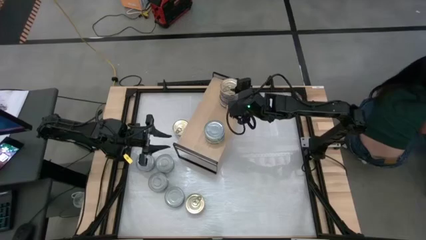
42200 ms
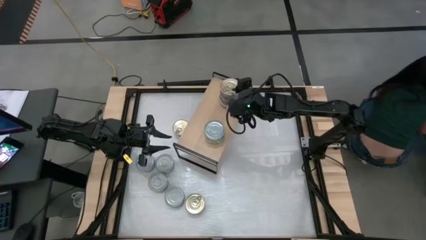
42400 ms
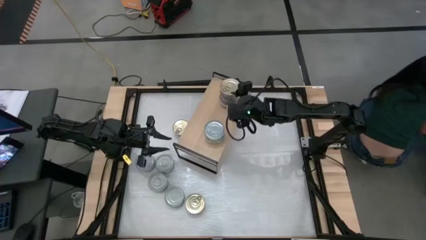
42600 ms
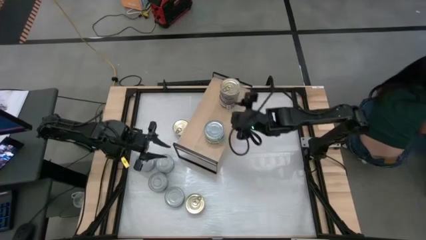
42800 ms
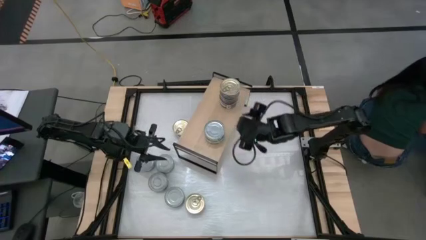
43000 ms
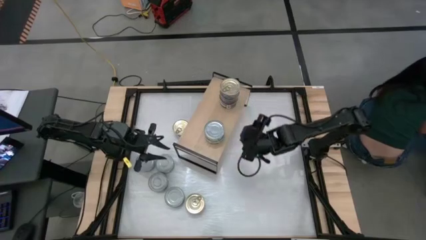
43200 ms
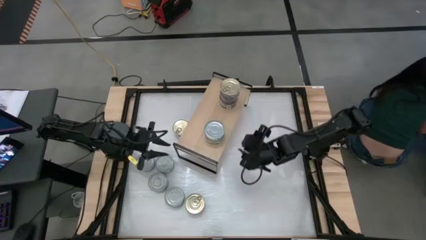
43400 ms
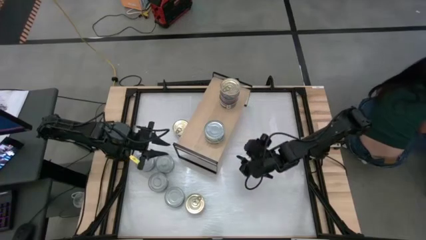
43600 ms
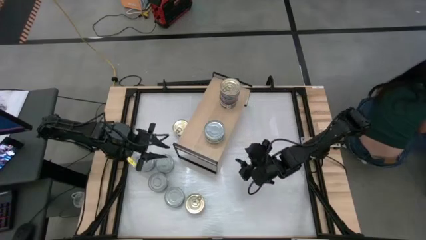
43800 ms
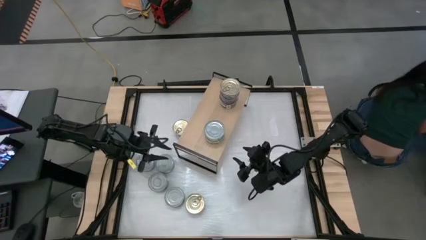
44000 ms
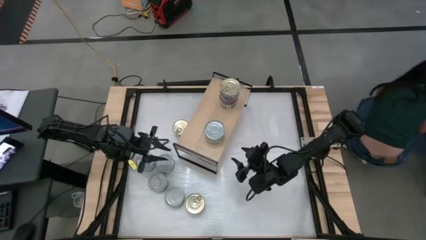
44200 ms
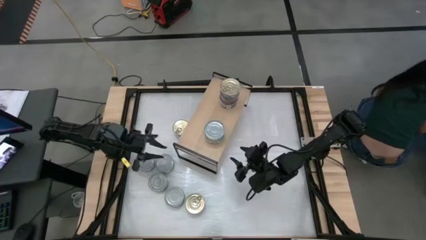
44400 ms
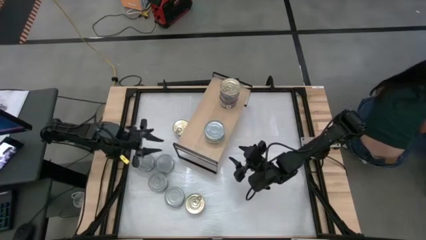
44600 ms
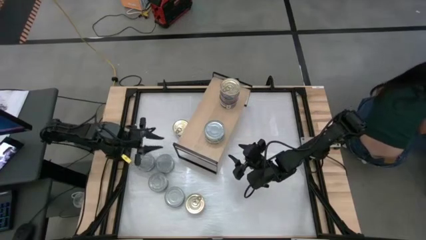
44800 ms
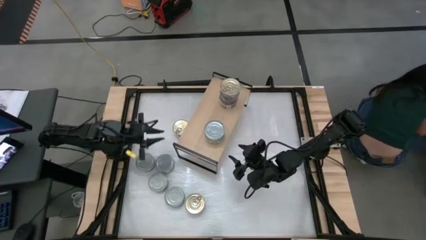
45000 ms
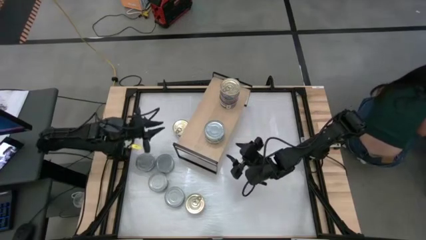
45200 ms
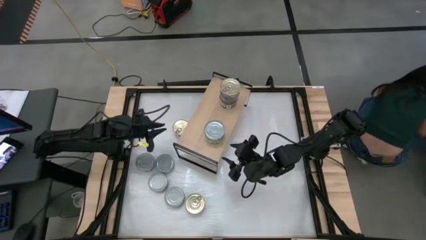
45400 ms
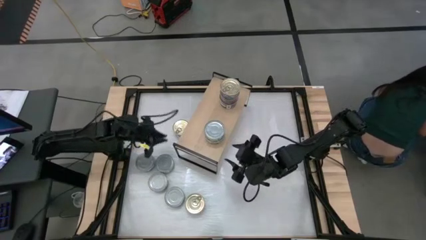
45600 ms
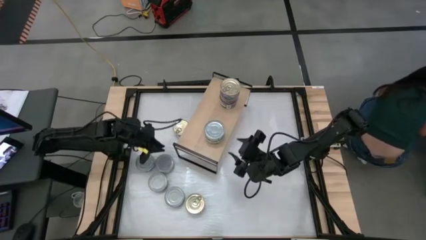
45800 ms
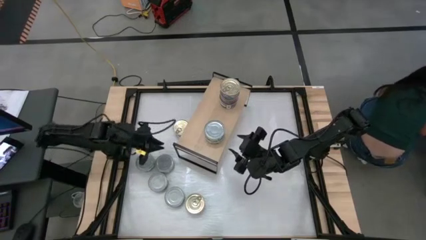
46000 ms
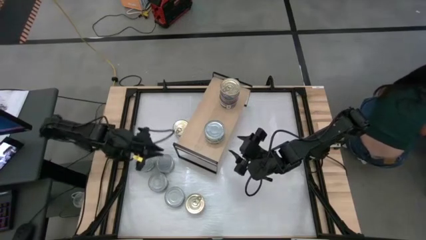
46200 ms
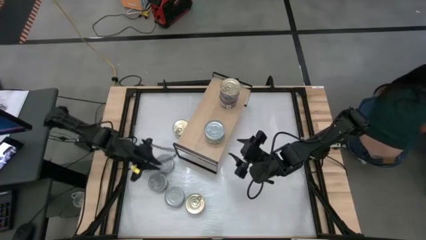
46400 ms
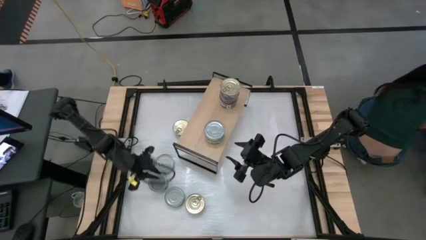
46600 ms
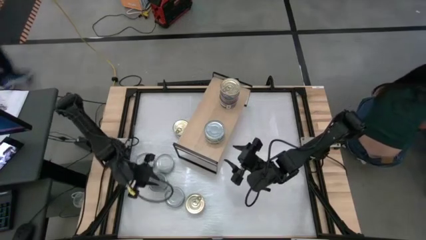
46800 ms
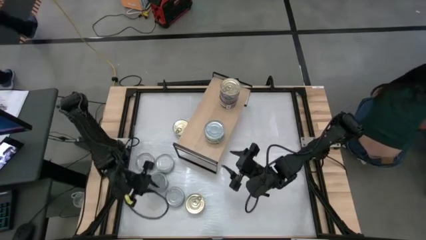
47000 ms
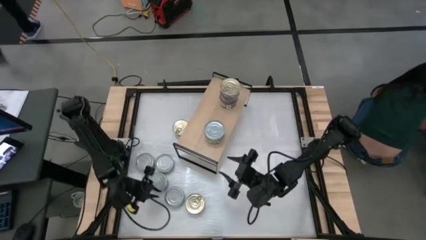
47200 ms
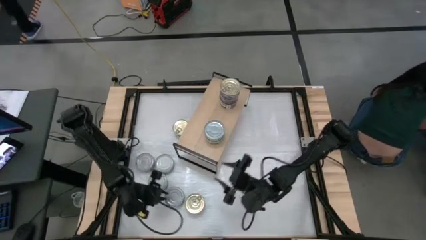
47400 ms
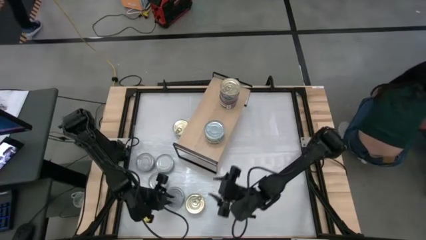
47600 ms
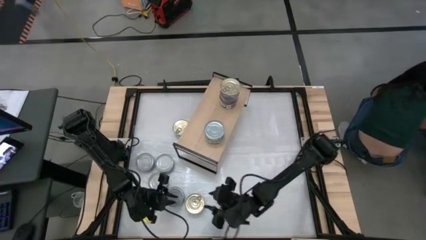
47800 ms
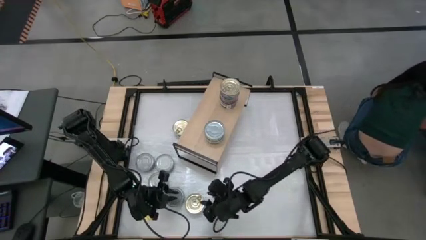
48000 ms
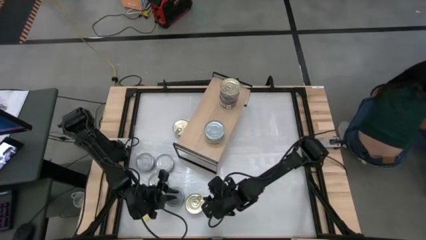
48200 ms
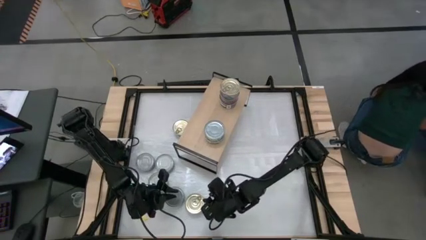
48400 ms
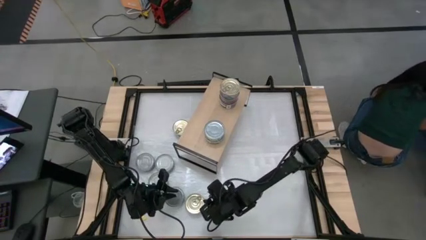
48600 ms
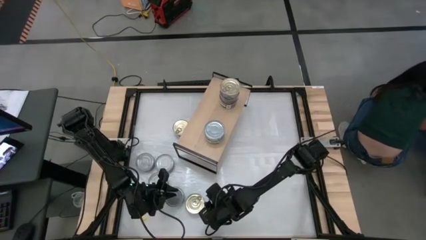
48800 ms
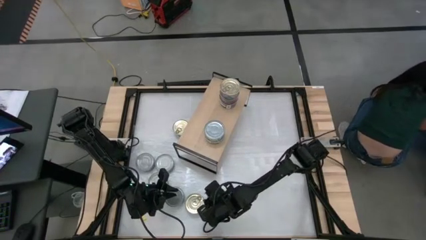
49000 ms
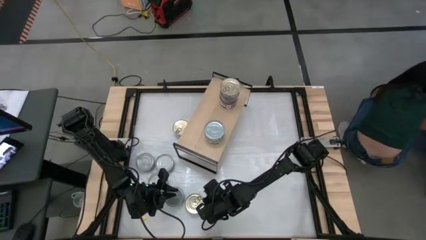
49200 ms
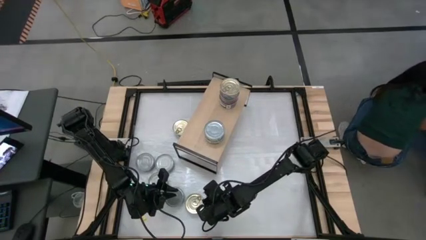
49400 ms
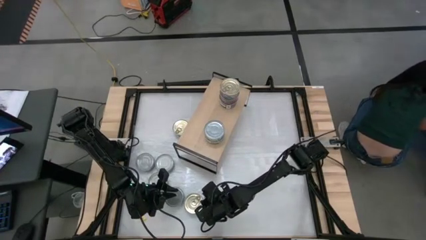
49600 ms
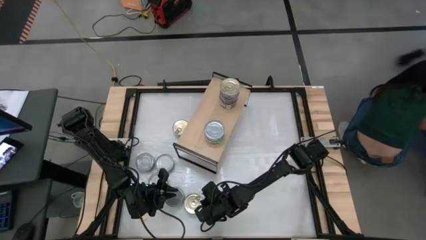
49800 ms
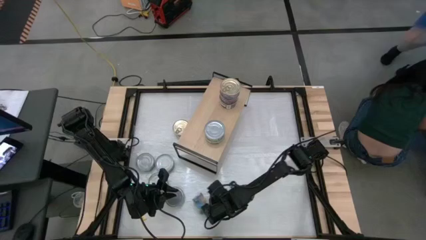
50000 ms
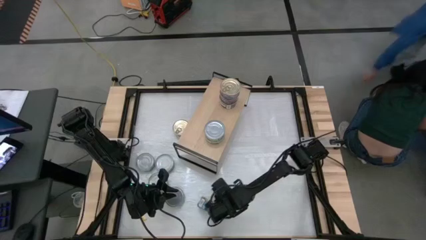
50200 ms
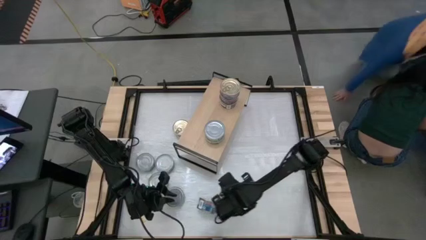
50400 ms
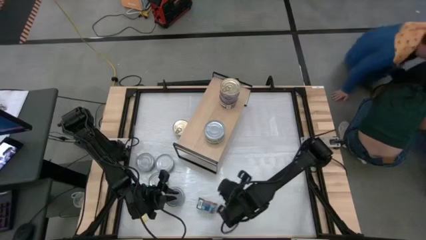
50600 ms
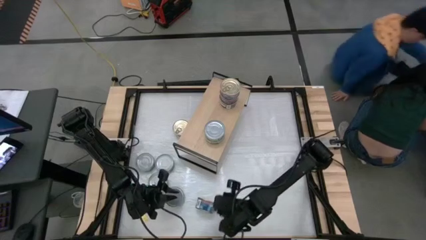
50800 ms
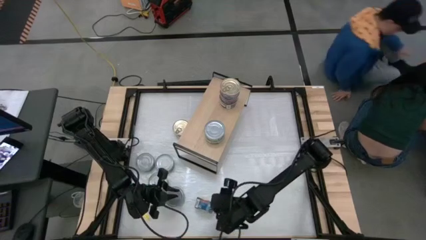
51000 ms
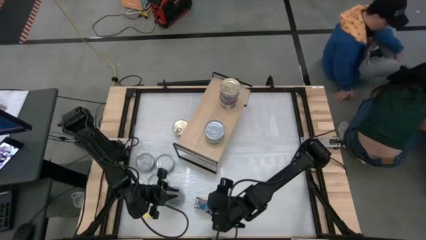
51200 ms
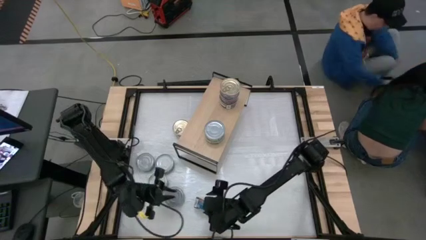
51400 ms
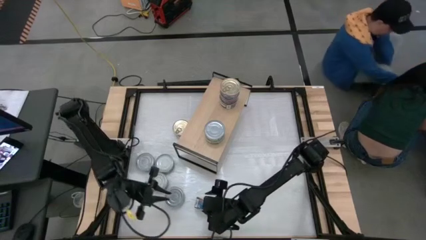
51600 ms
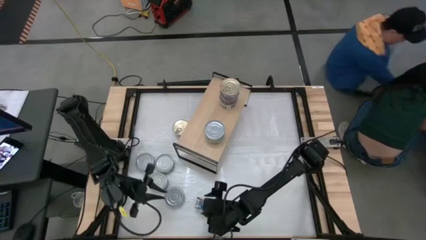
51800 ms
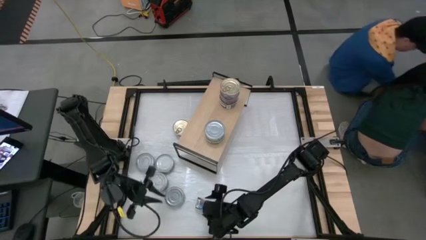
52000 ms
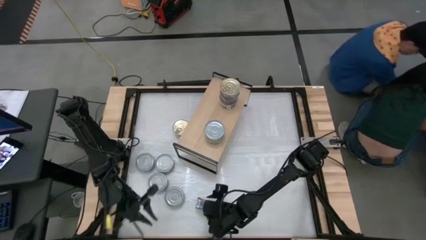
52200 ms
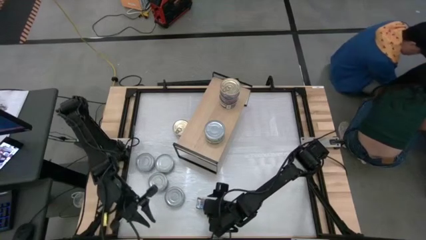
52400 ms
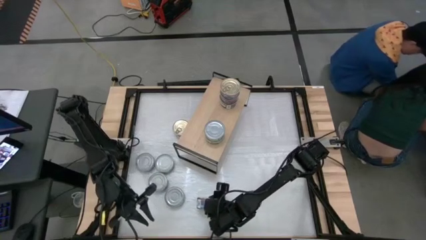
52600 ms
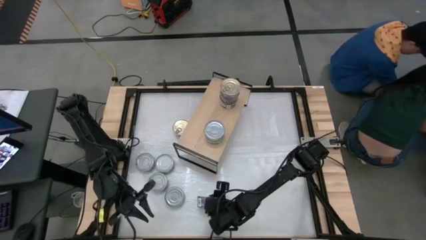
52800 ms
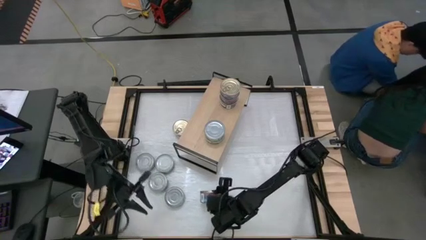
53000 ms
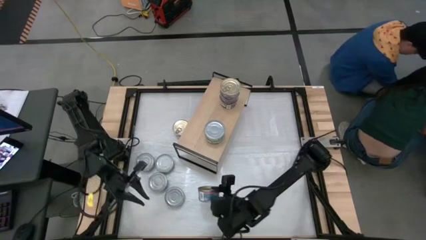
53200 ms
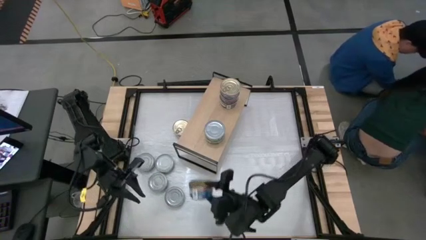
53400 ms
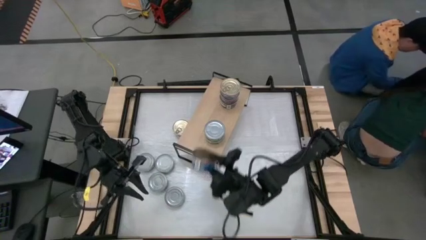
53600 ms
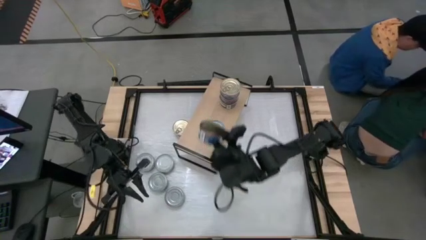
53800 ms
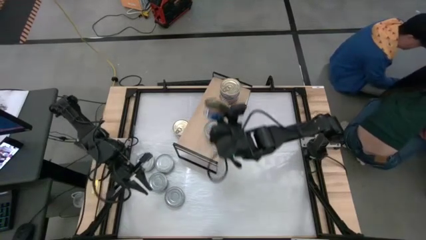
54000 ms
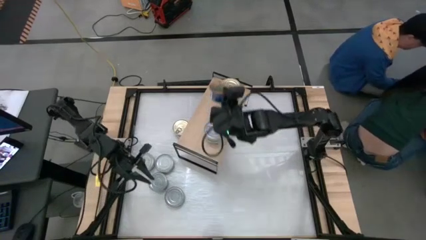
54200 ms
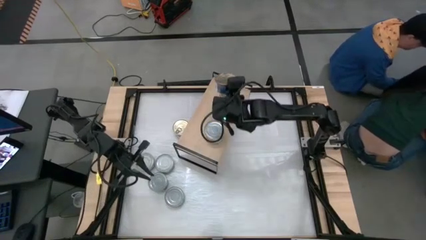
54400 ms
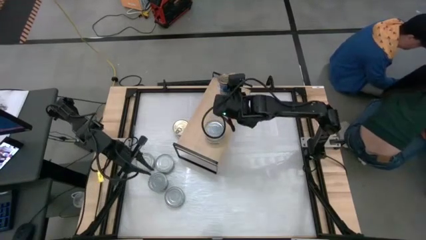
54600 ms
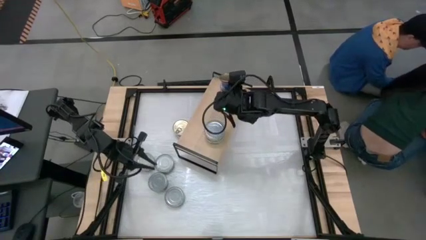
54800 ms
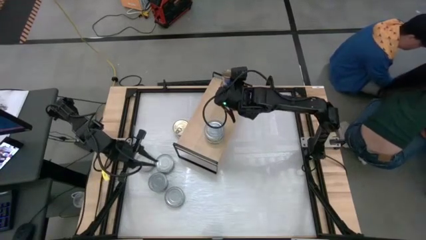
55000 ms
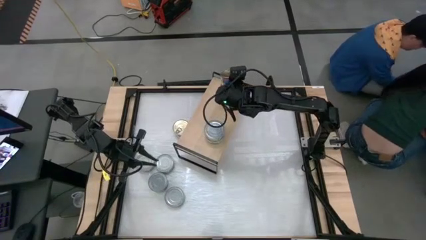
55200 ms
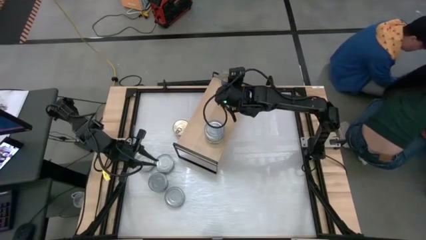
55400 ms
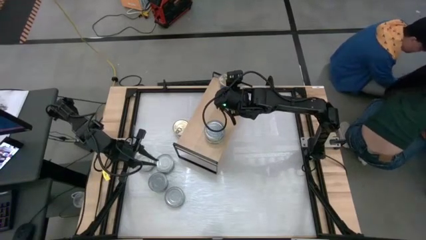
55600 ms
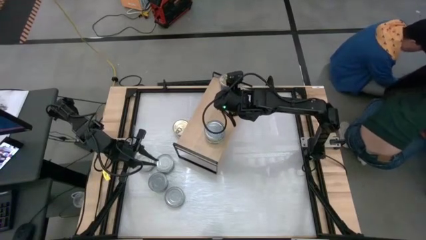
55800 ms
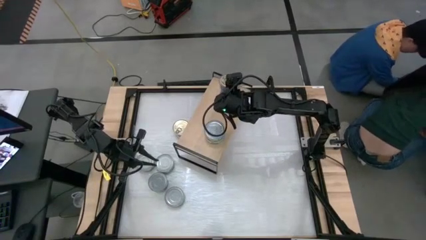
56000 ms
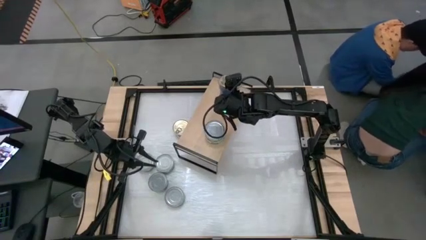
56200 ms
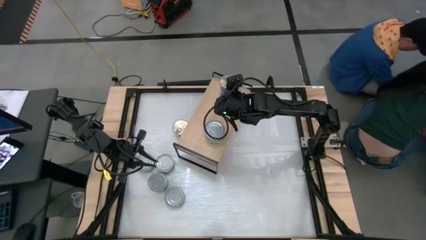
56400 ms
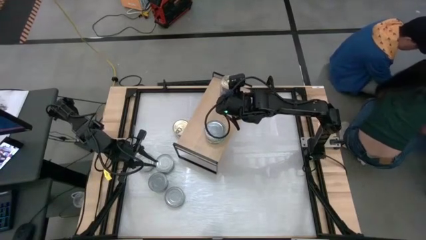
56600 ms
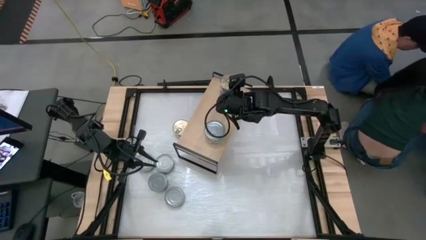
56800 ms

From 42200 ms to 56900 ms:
Task: Stack canned seafood by type on shelf
Stack the blue tuna can on top of the other blue tuna can
